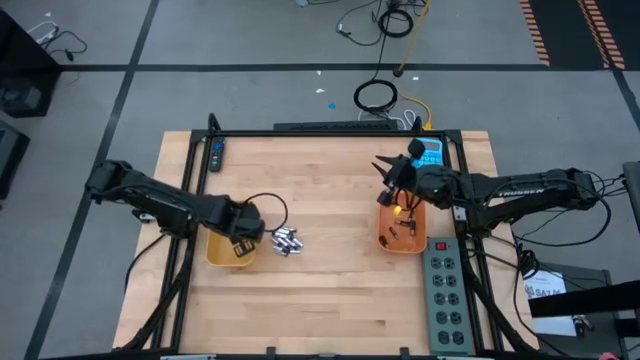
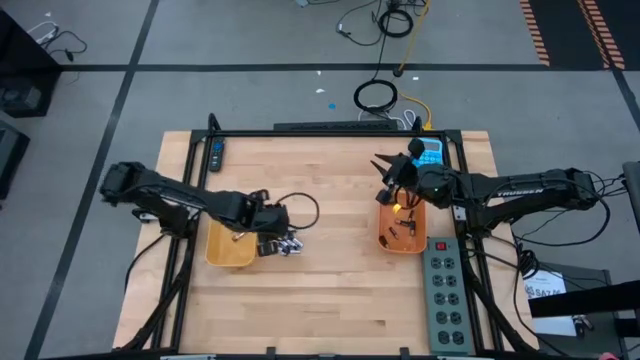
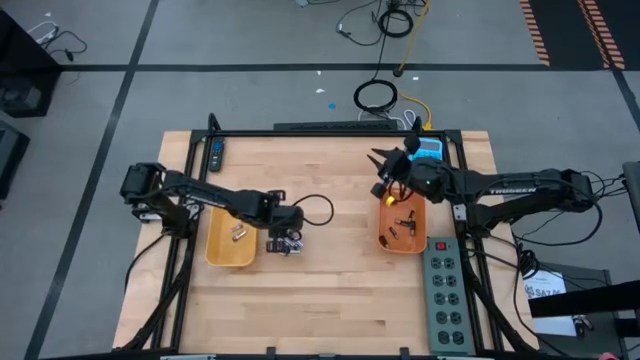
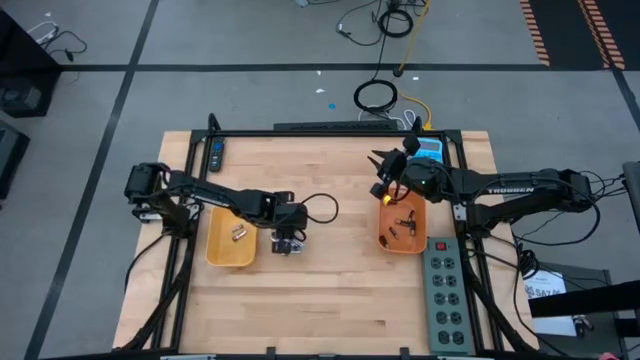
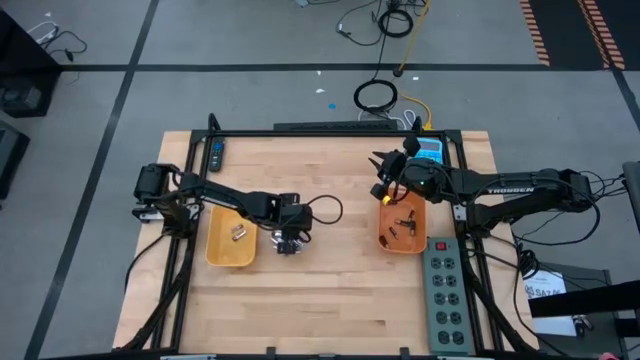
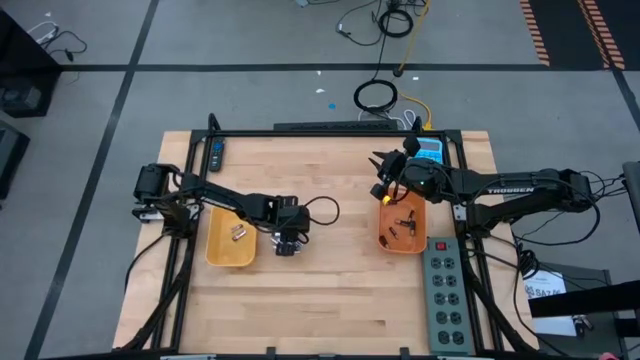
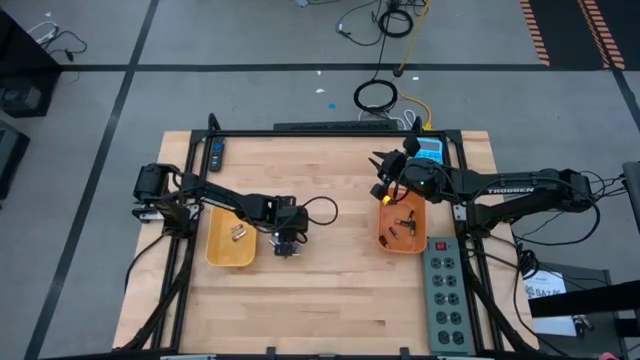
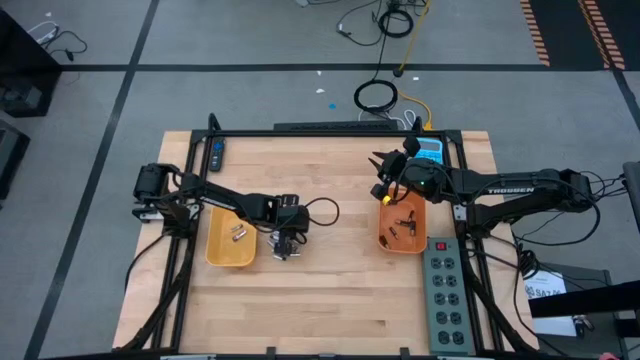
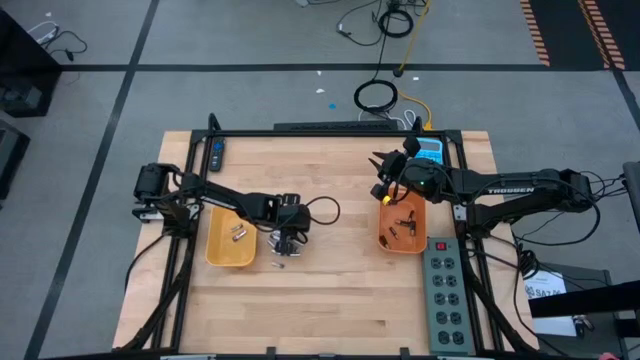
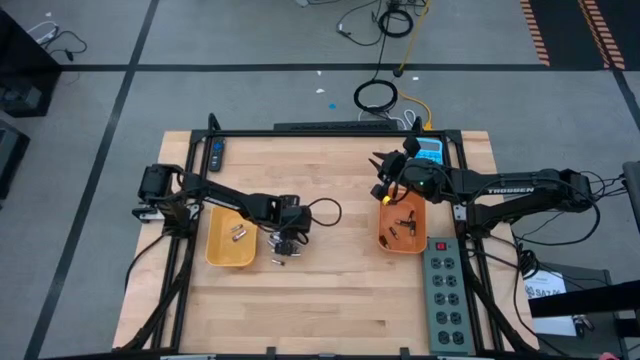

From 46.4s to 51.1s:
Task: Sort batteries
Put the silver battery into the yellow bin

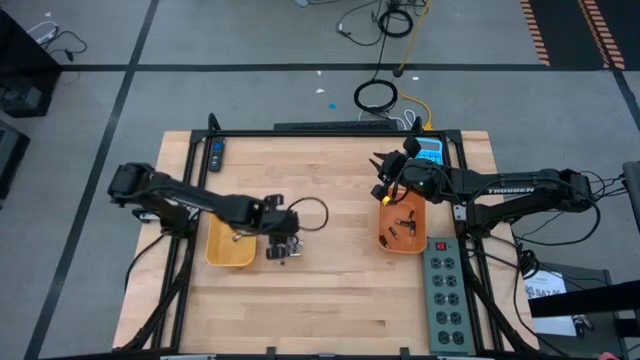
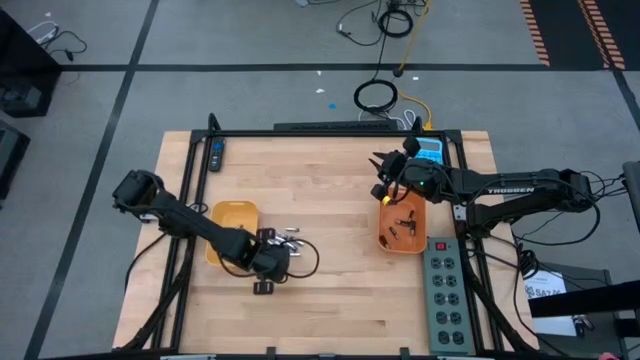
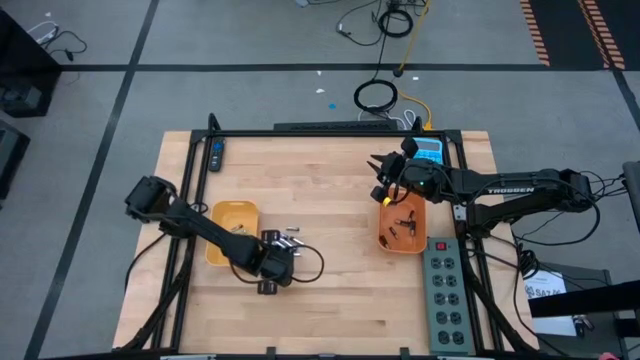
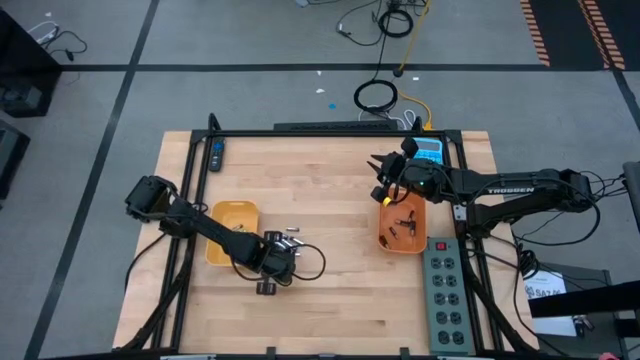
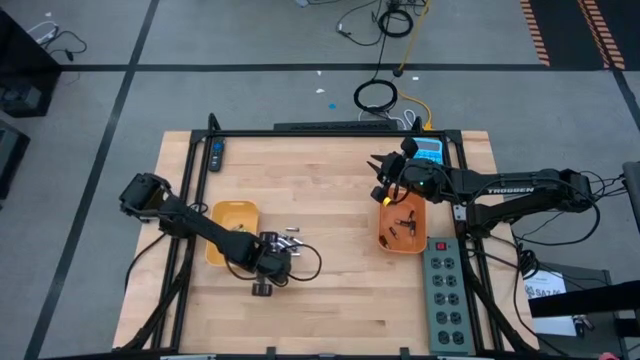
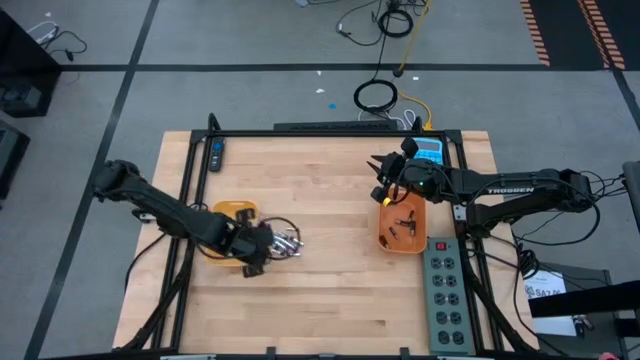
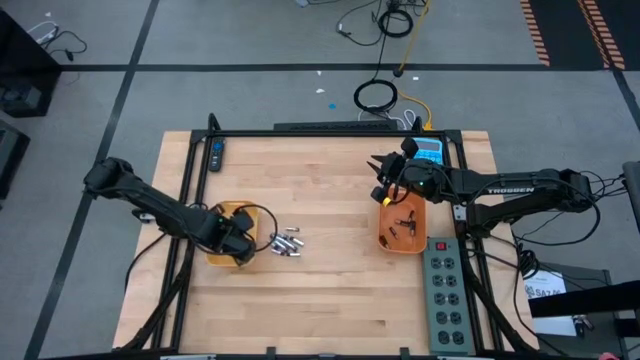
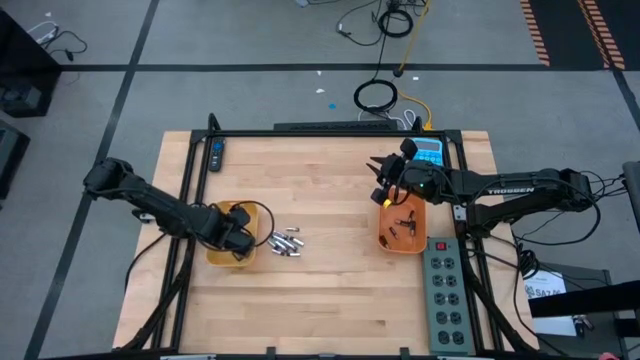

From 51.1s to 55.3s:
Put the silver battery into the yellow bin

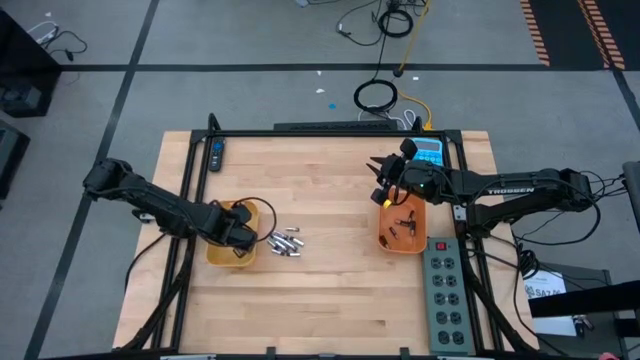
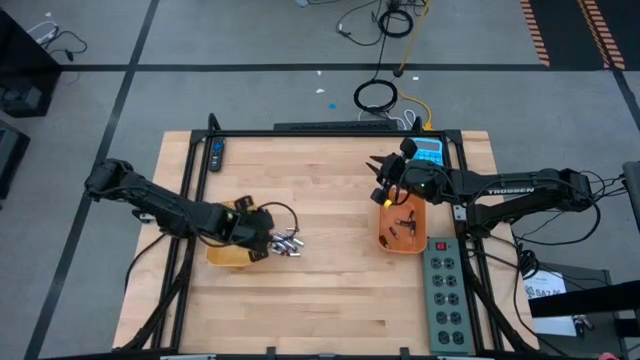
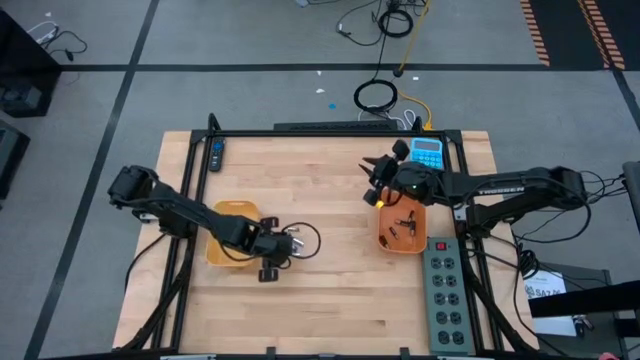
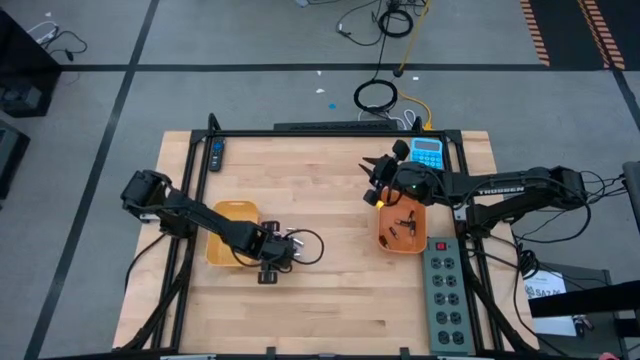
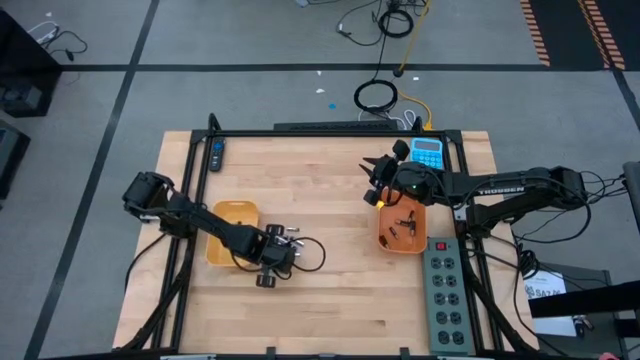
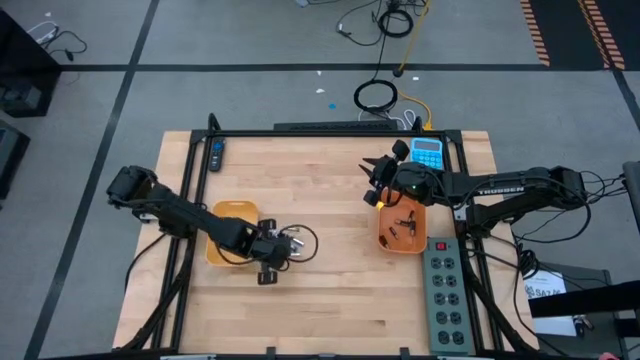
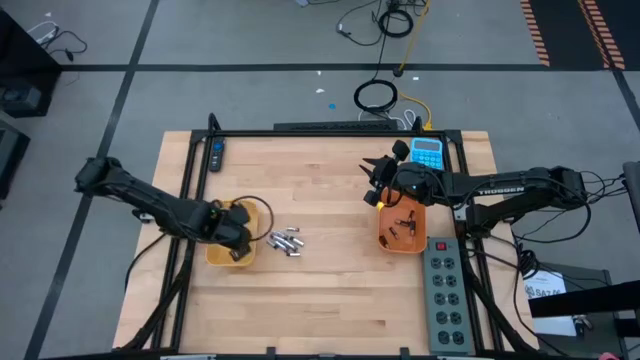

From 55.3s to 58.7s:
Put the silver battery into the yellow bin

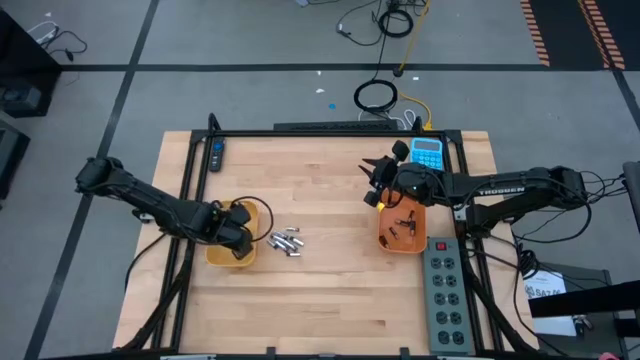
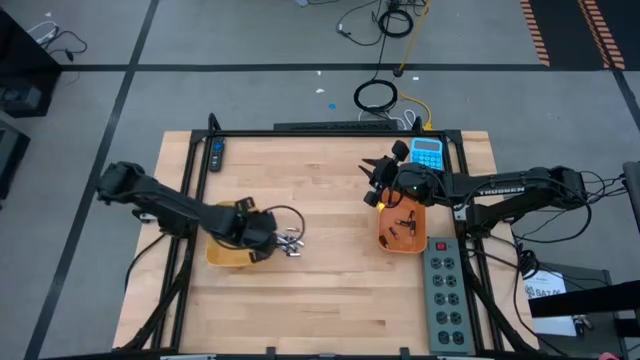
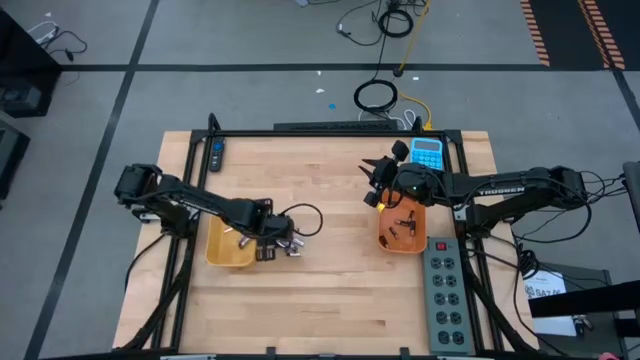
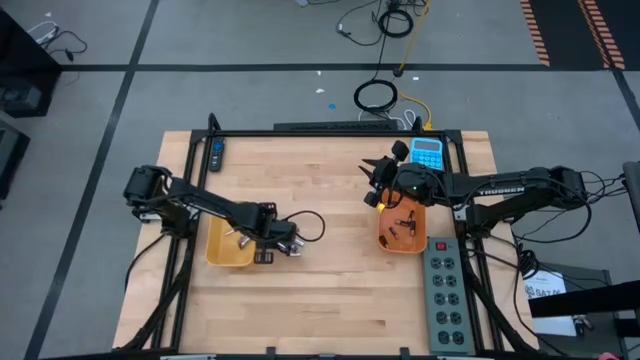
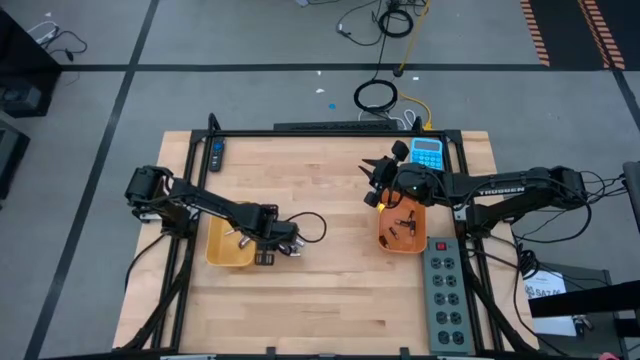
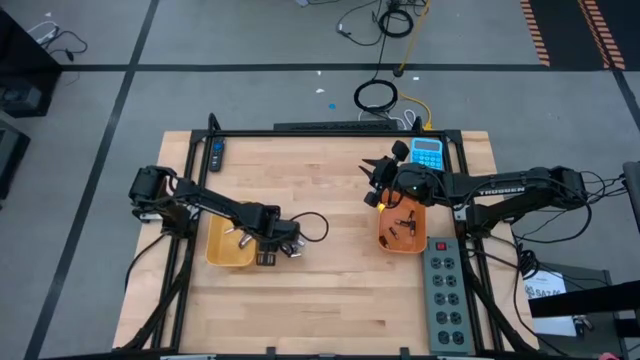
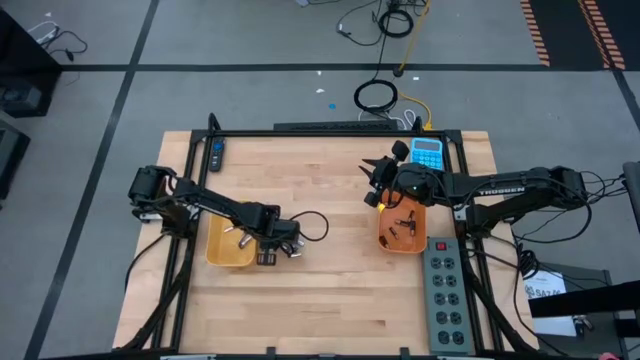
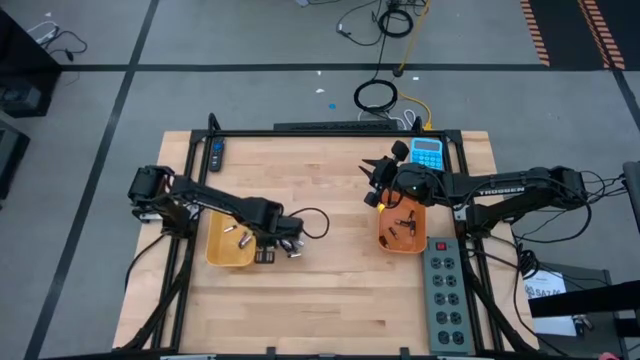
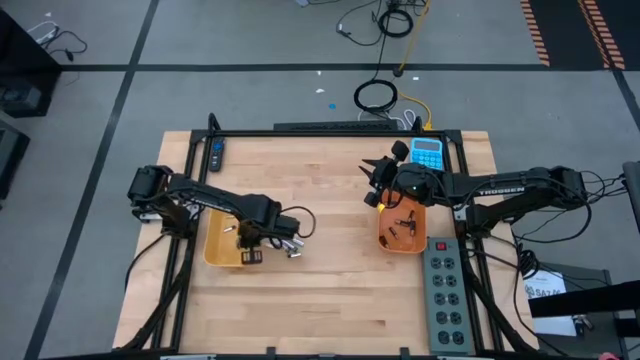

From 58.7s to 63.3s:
Put the silver battery into the yellow bin

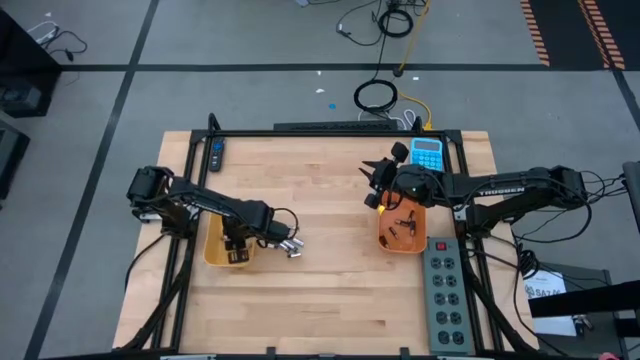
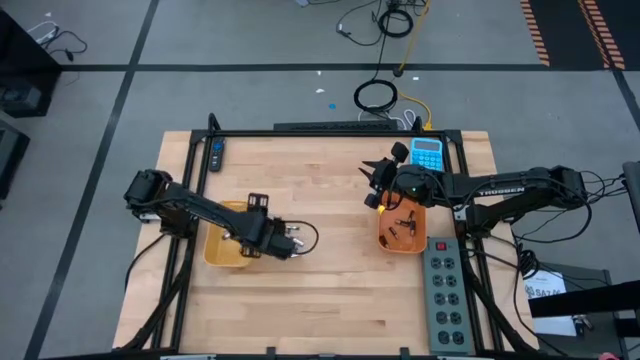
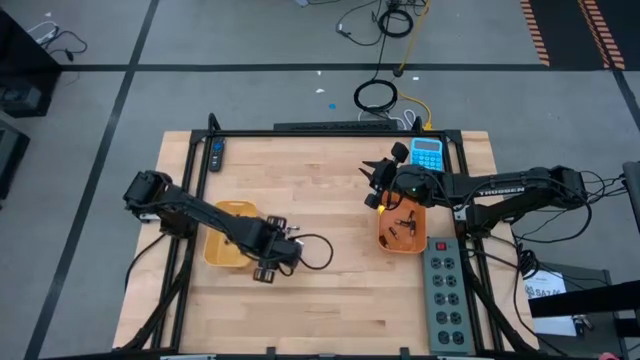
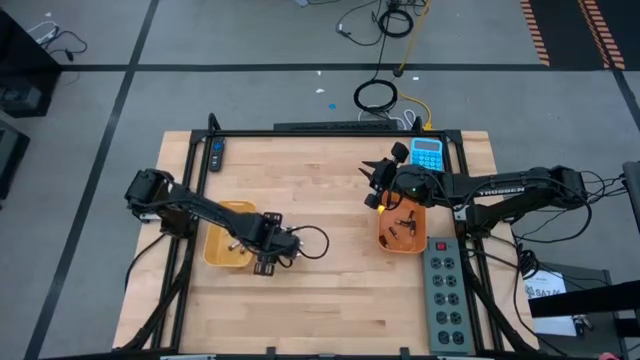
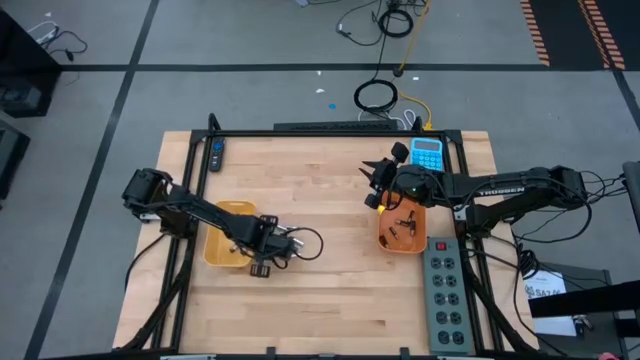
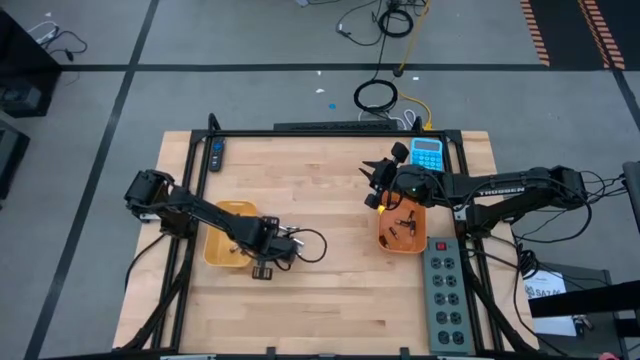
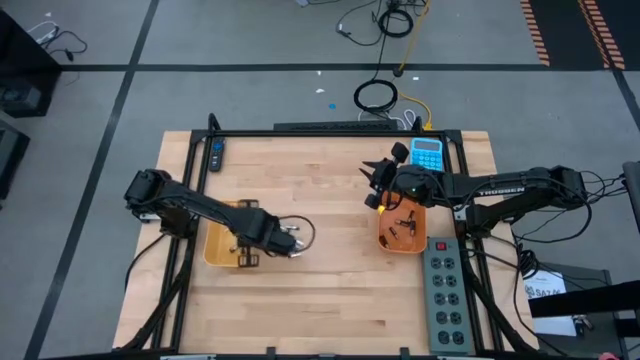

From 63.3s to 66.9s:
Put the silver battery into the yellow bin

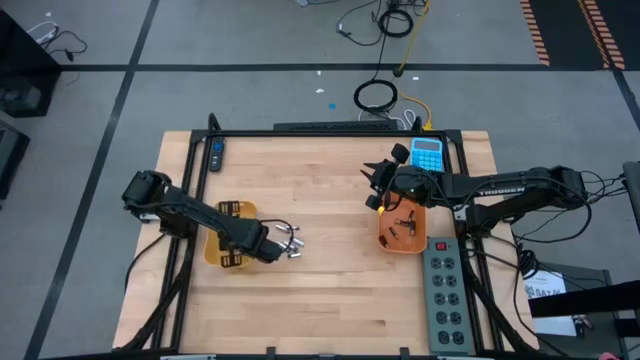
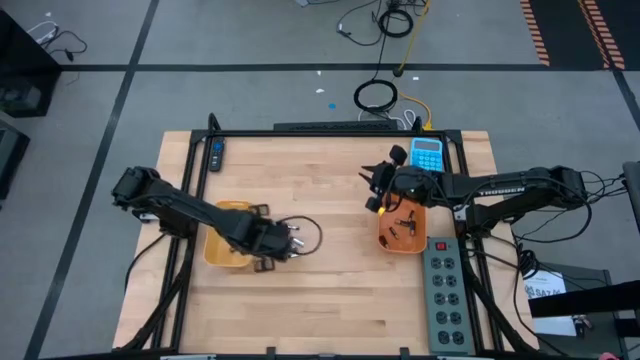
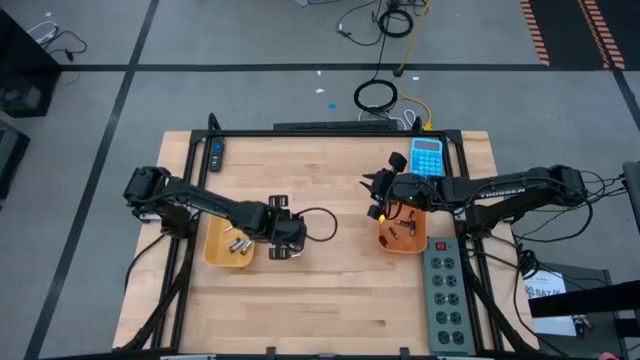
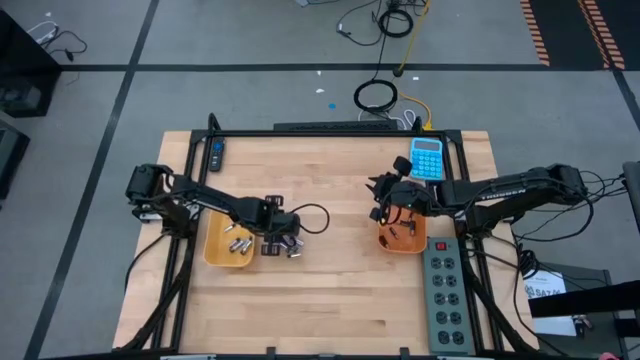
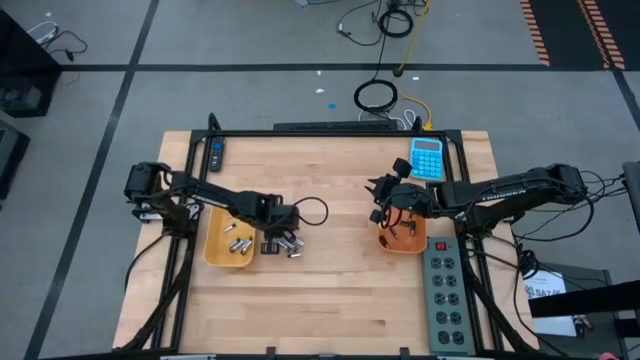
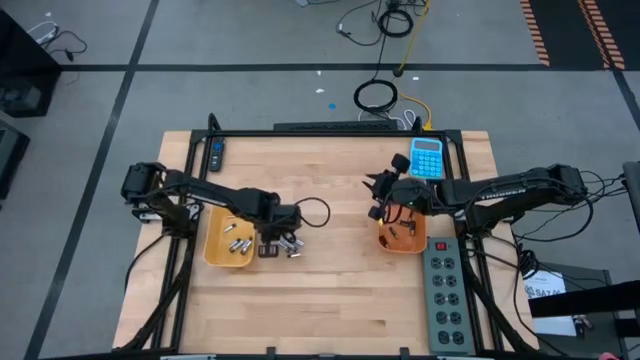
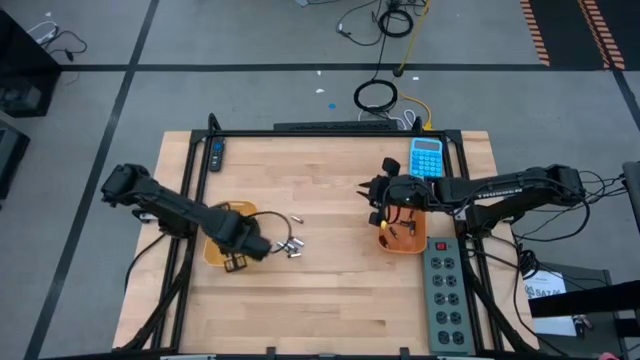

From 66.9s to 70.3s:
Put the silver battery into the yellow bin
